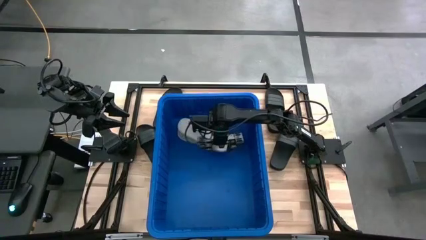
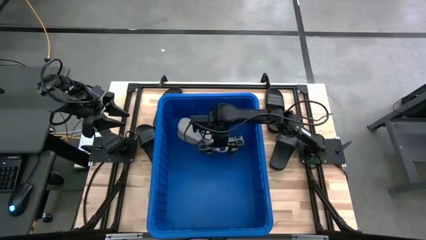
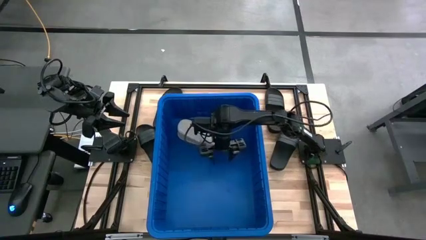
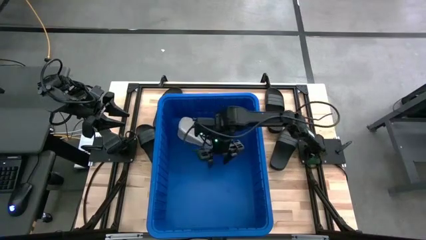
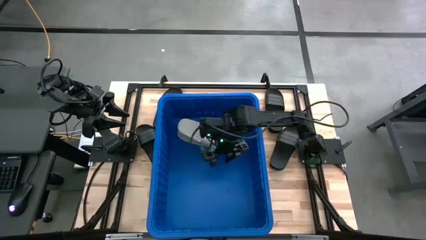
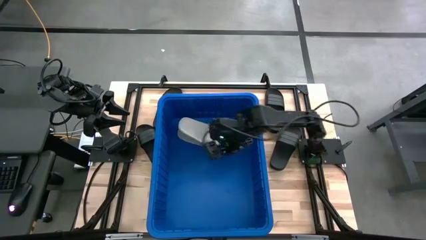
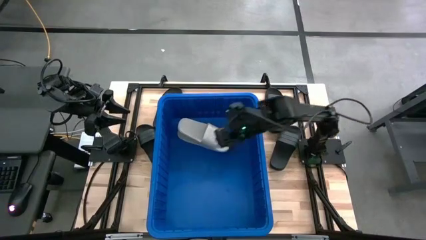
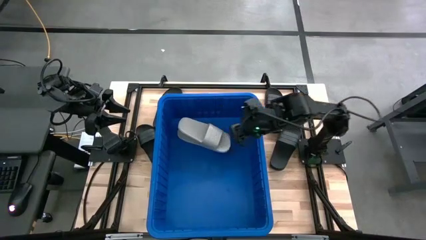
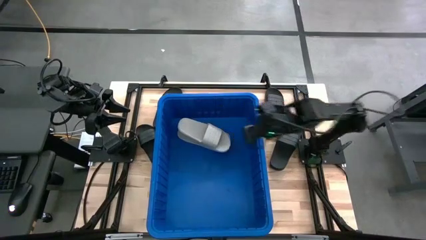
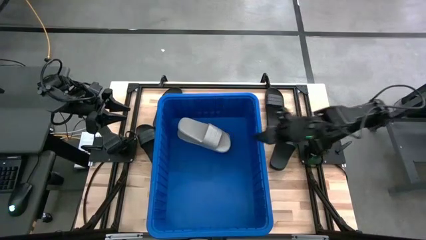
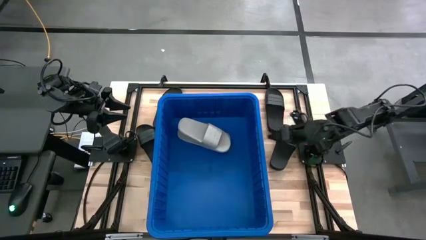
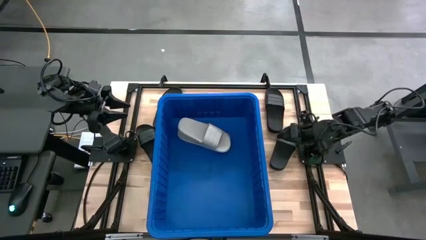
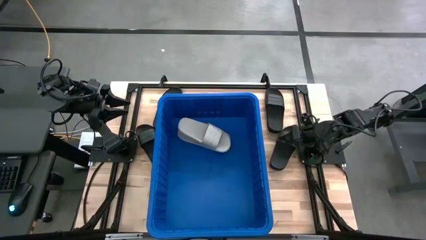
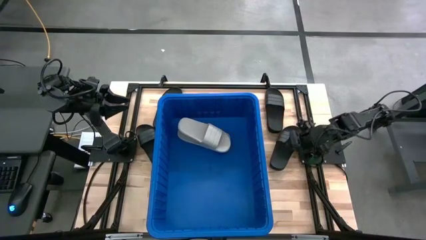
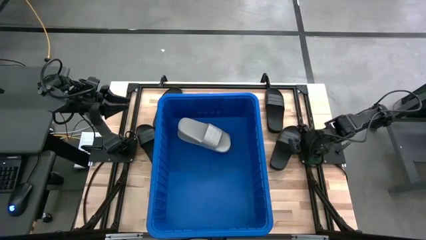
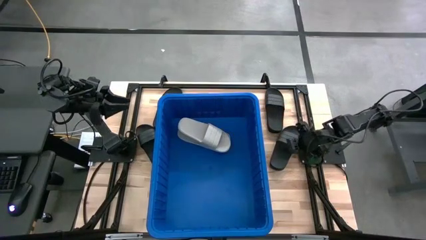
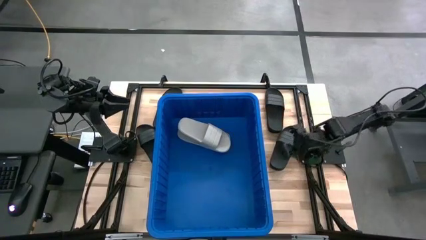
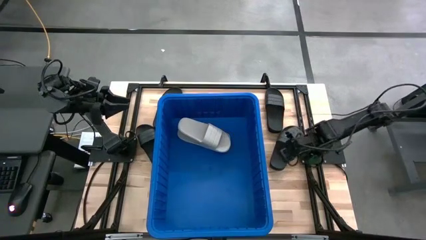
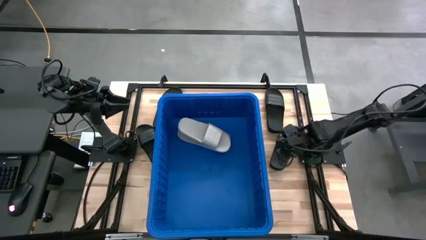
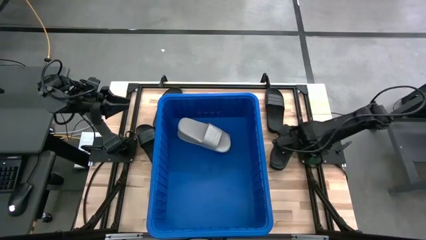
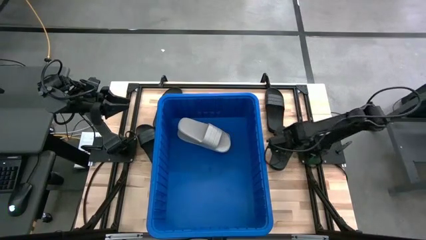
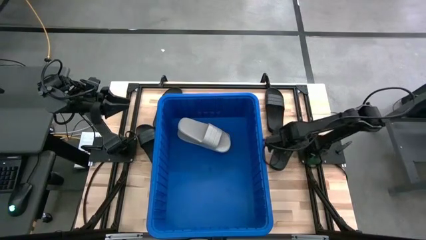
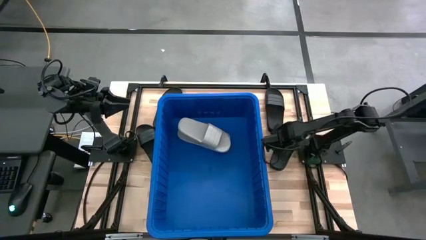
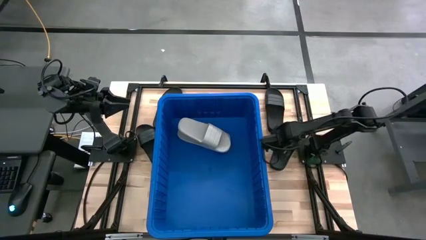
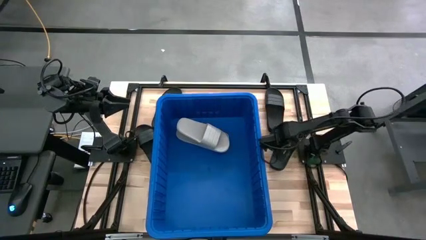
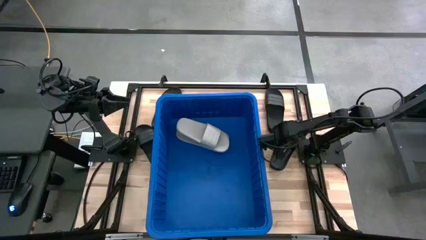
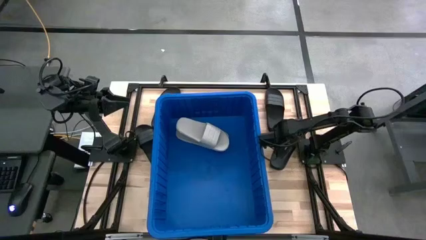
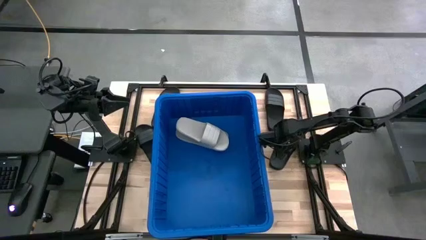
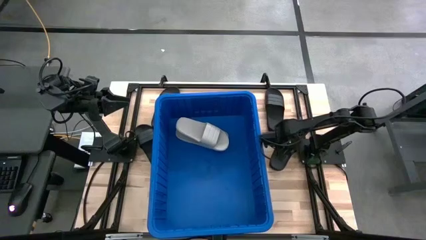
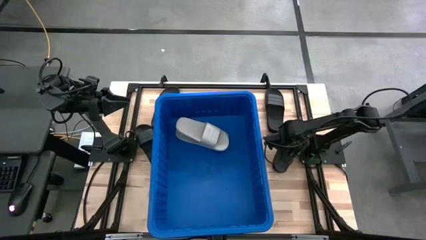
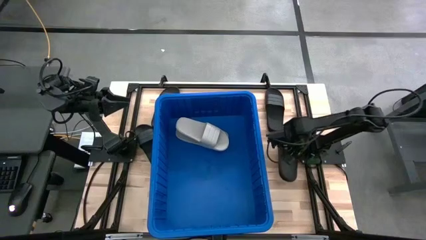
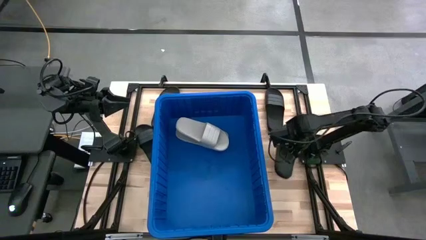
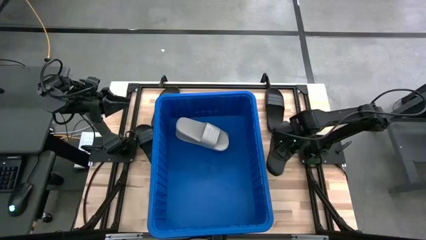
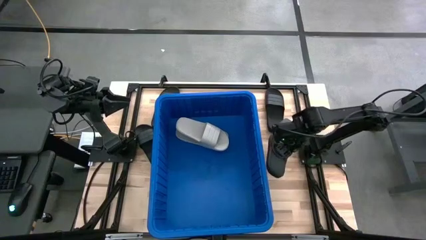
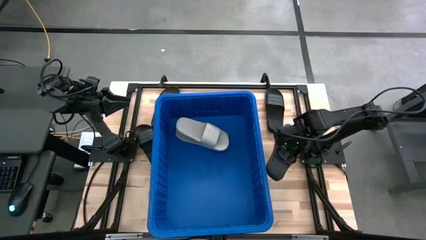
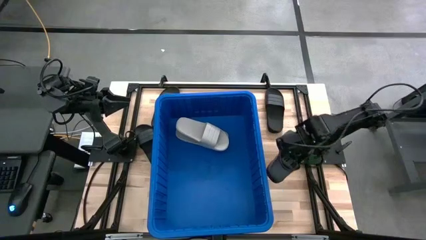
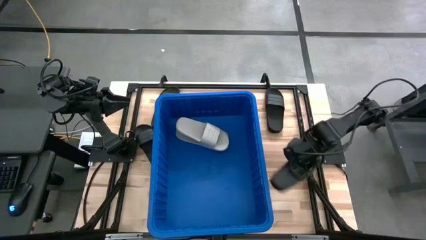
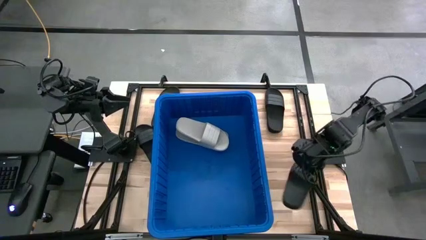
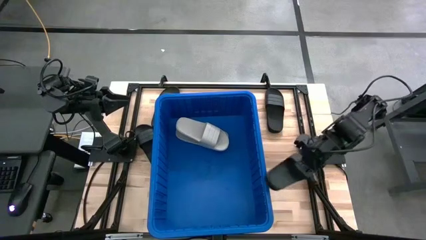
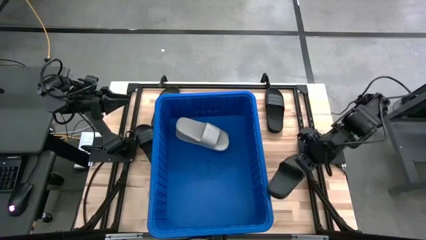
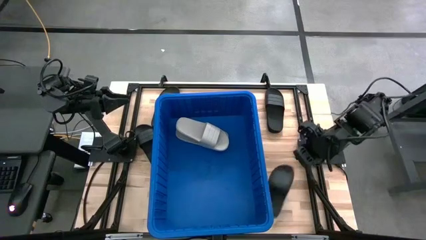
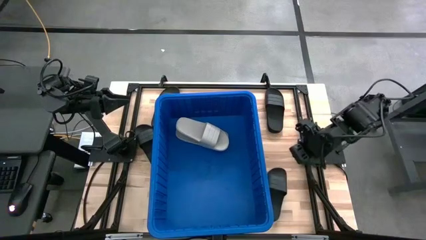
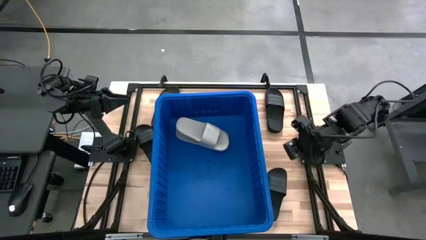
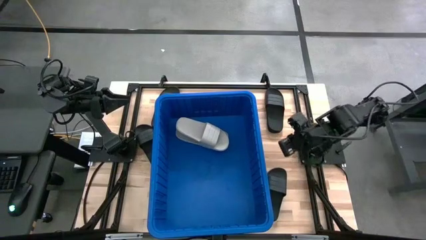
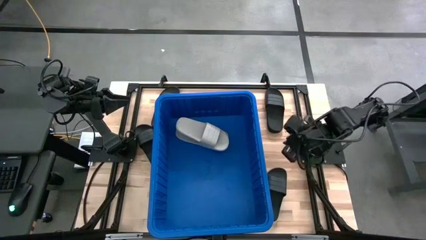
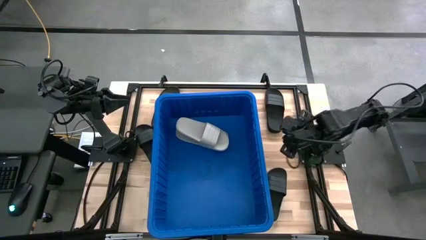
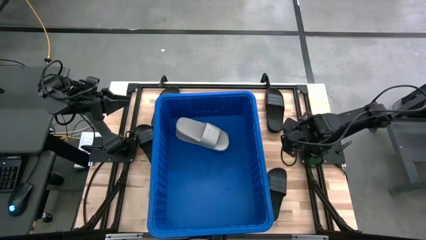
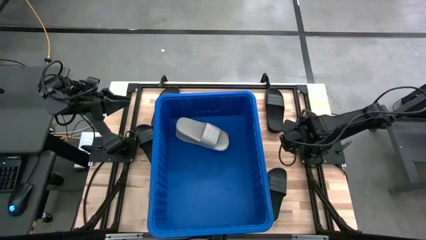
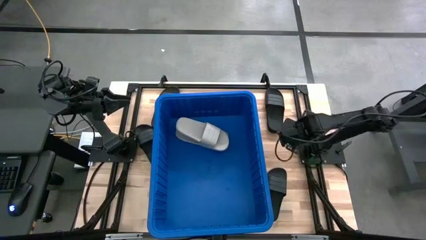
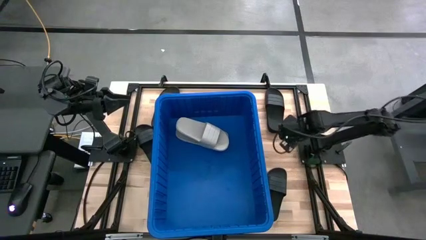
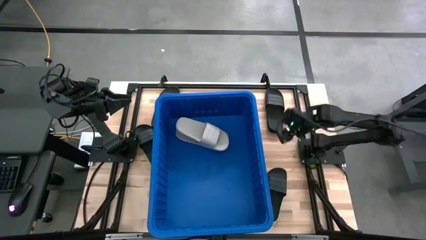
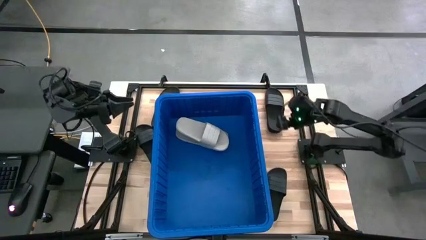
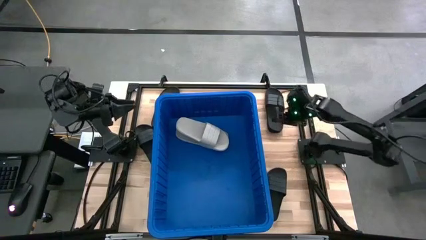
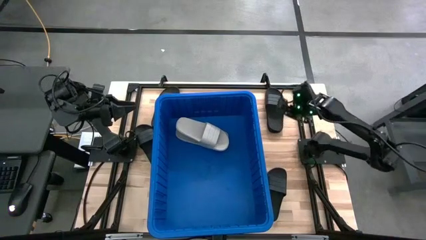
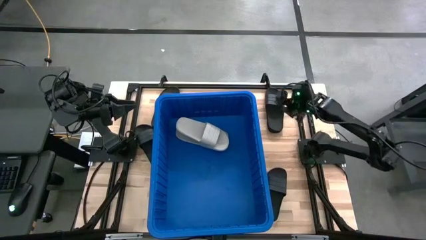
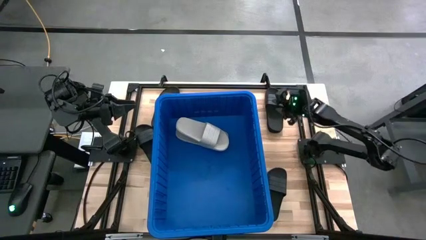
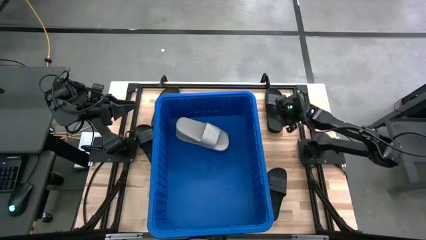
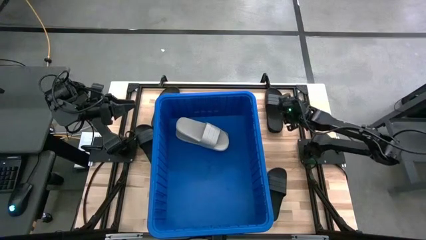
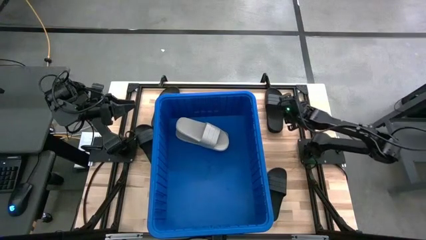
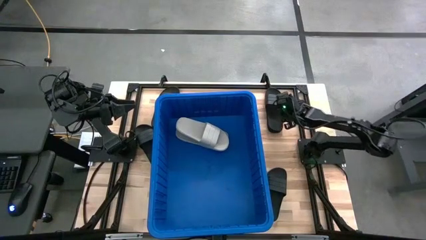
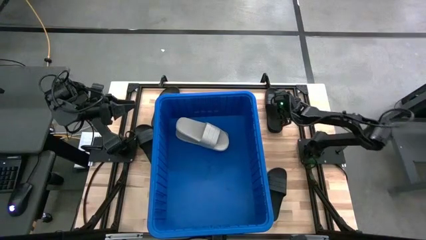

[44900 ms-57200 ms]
Task: Pick and place slides into bin
Put the black slide into the blue bin
